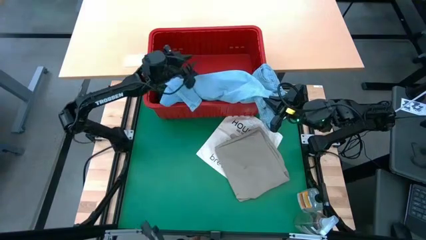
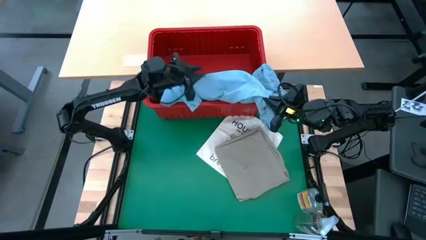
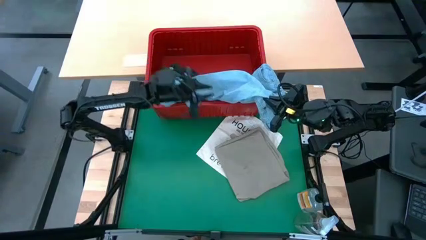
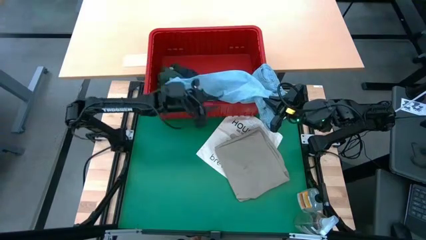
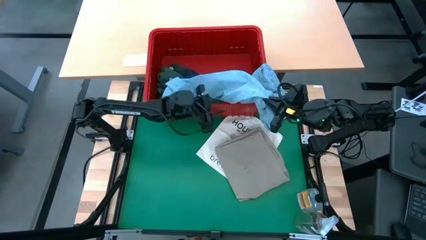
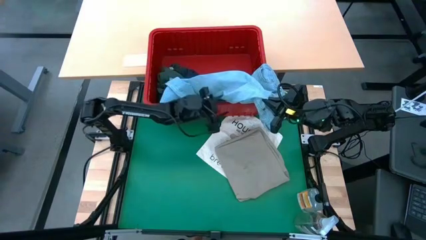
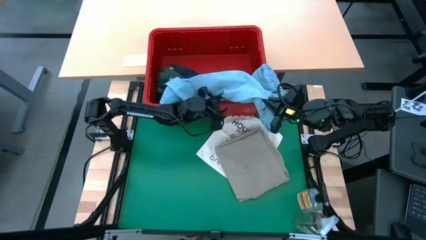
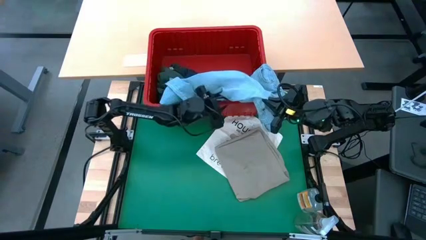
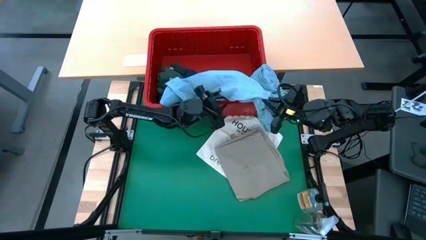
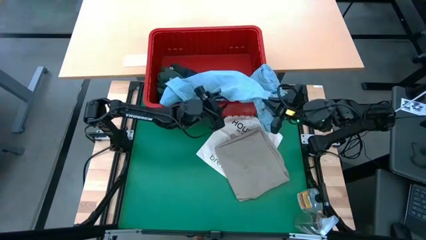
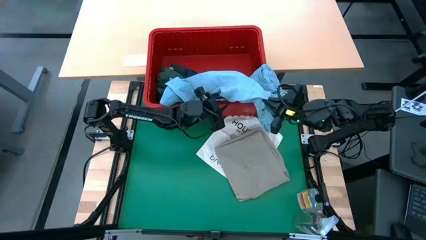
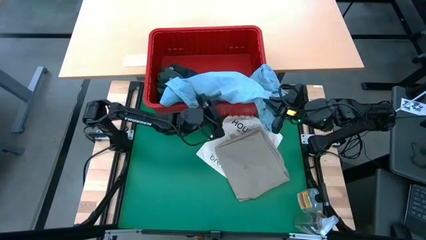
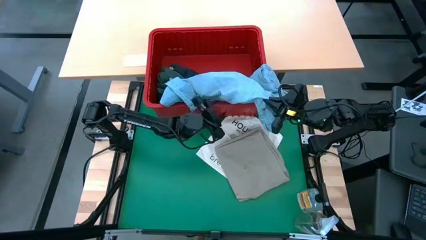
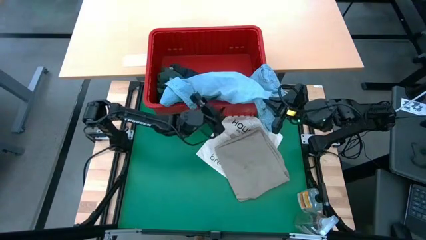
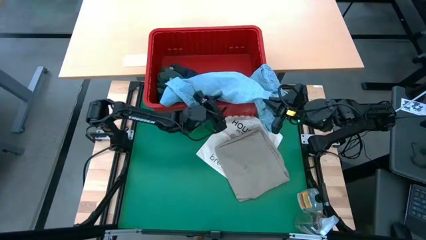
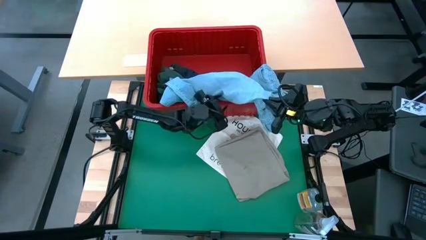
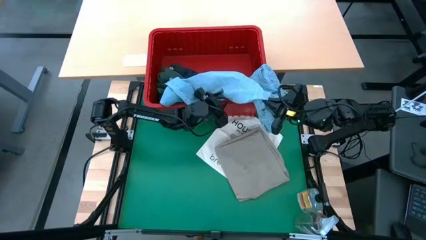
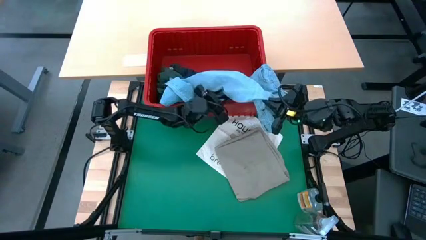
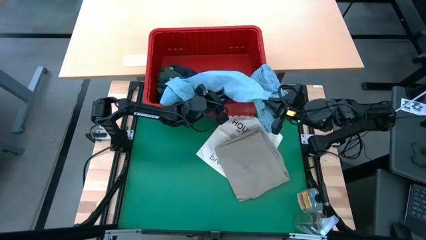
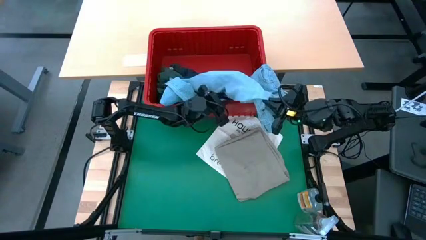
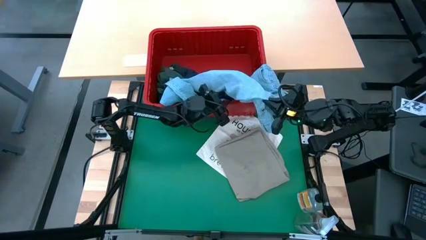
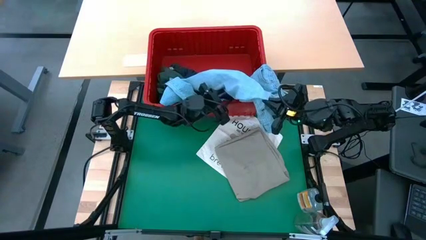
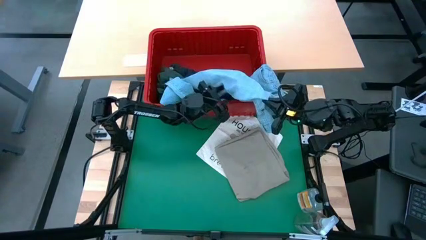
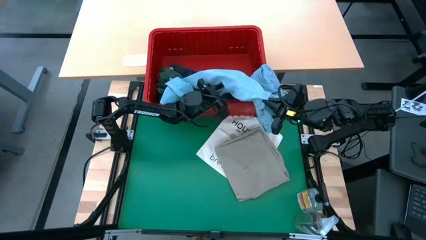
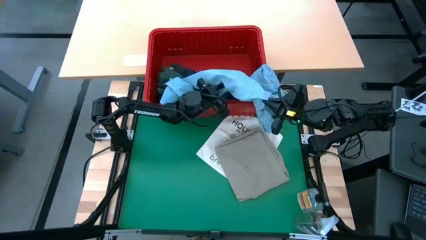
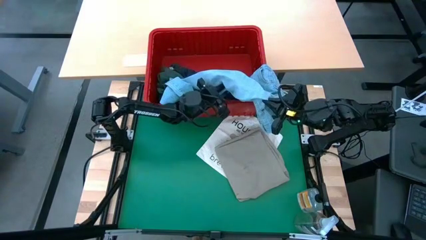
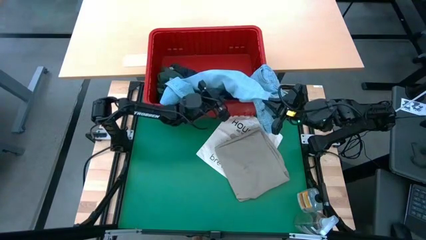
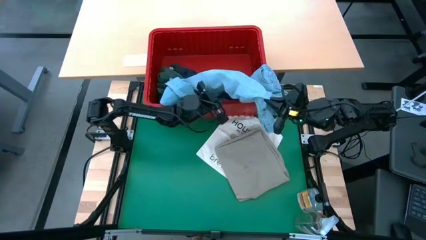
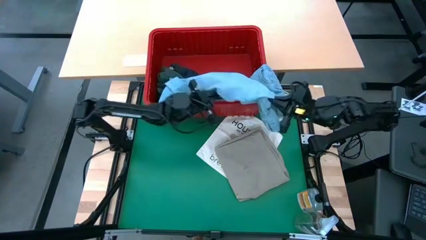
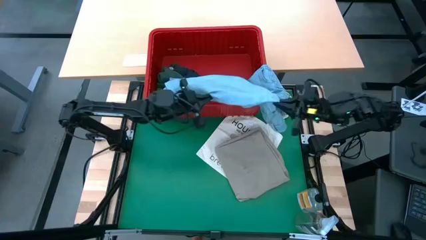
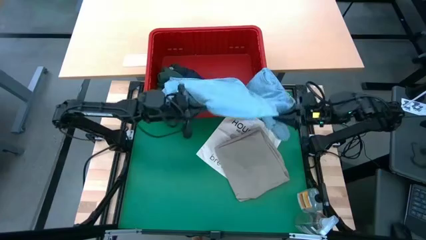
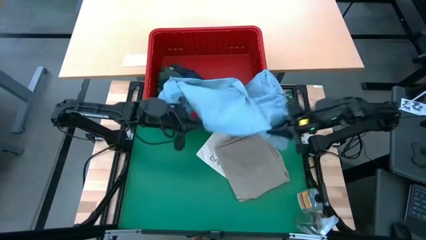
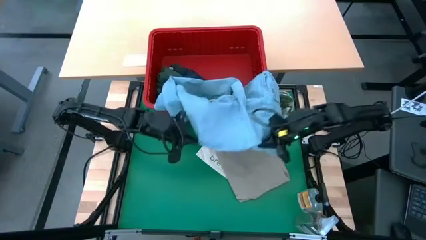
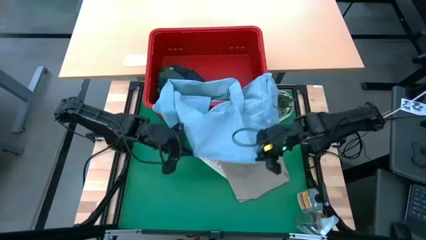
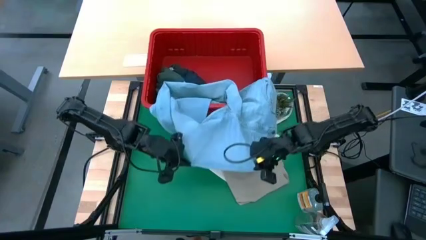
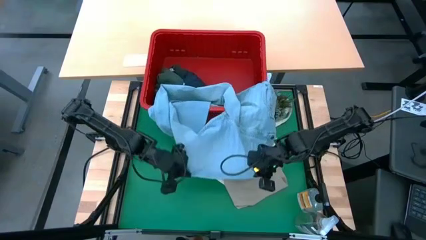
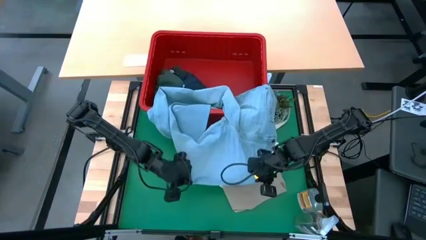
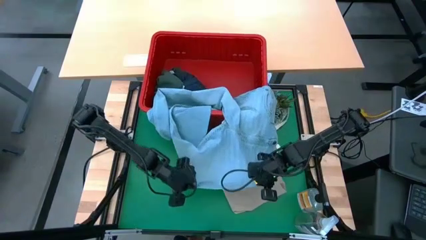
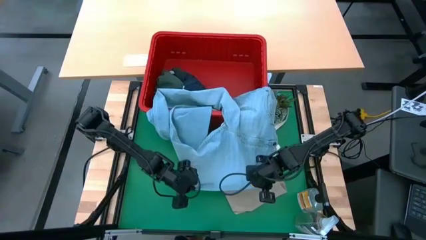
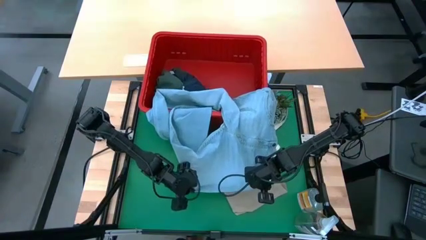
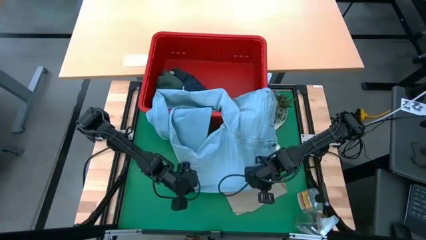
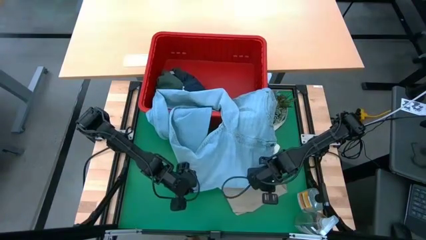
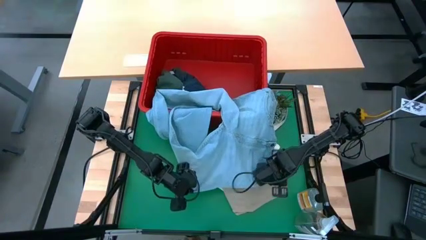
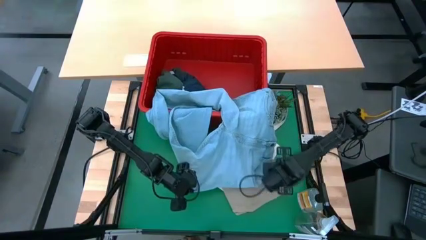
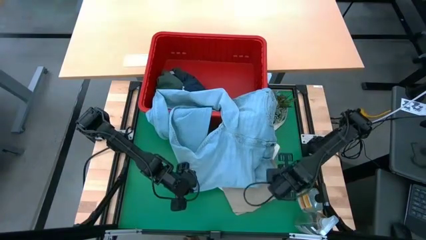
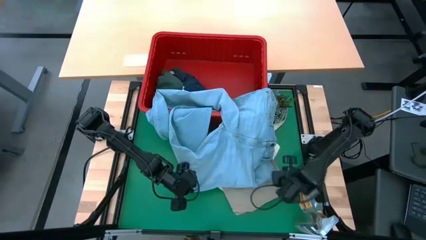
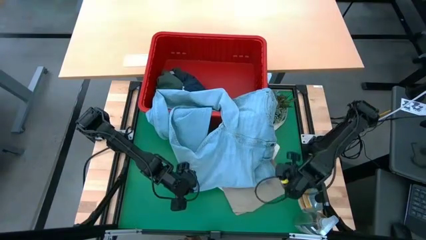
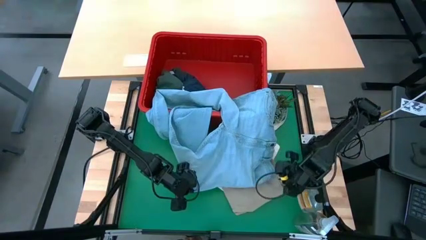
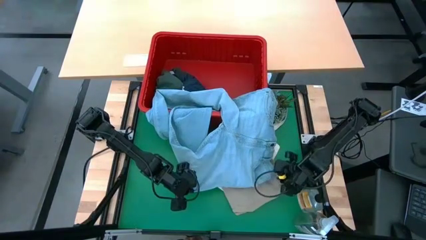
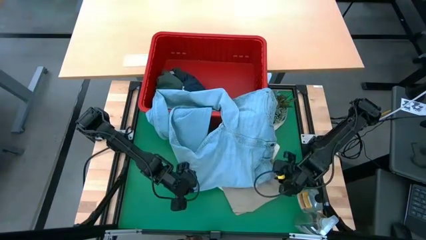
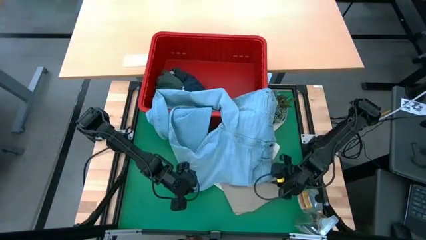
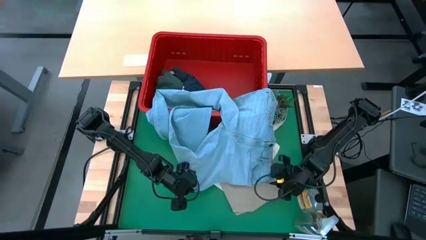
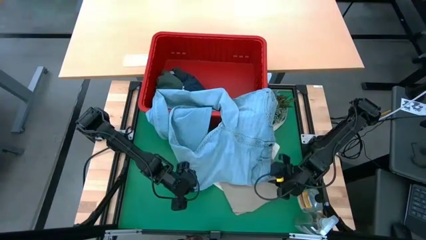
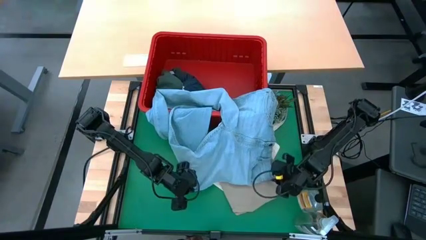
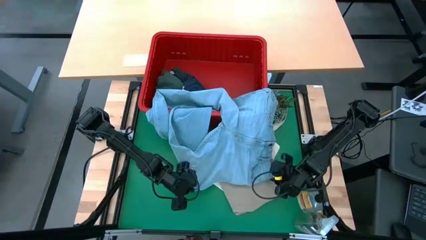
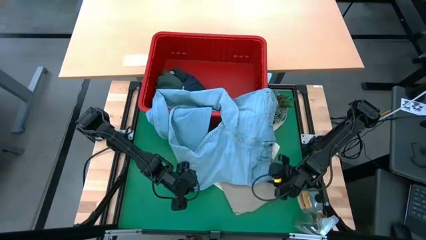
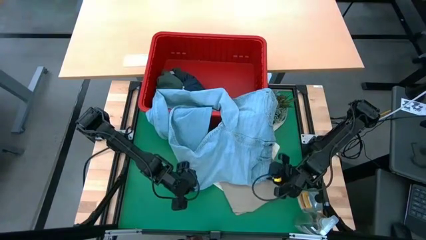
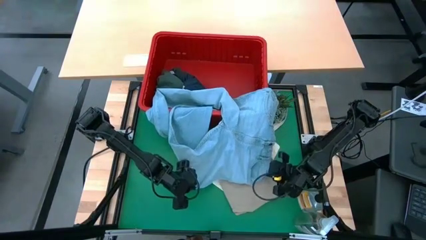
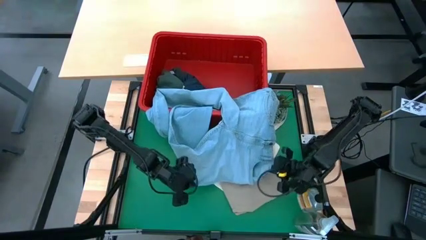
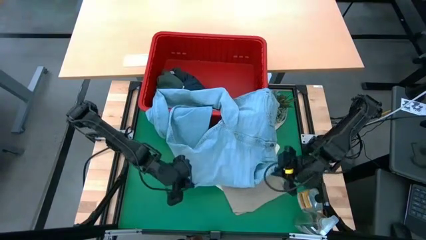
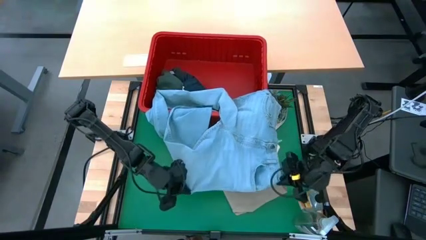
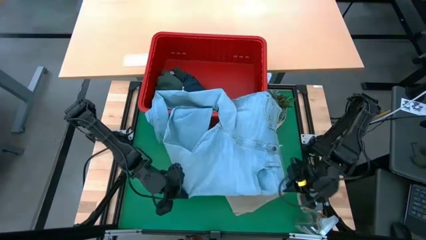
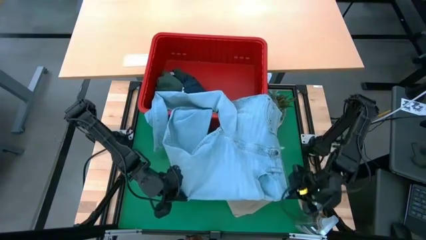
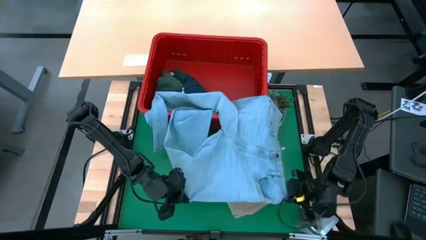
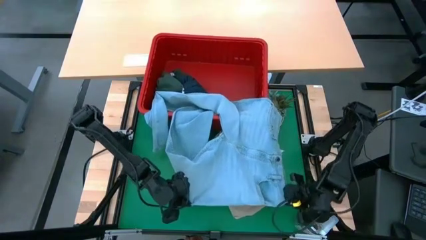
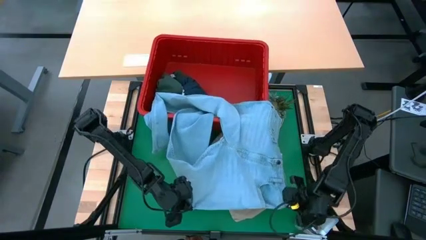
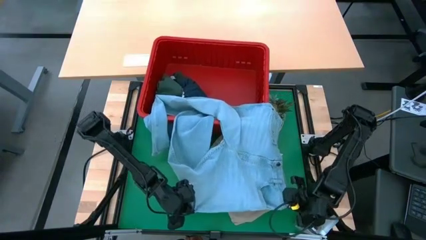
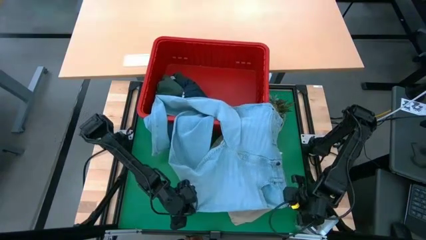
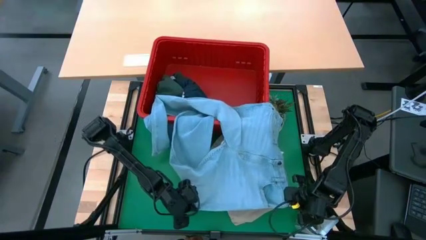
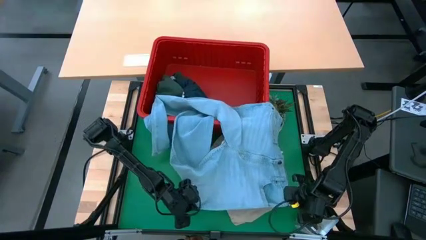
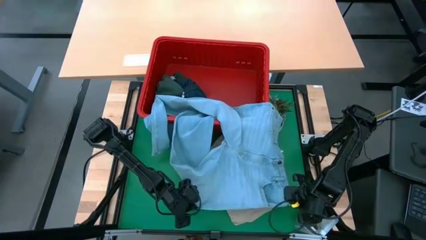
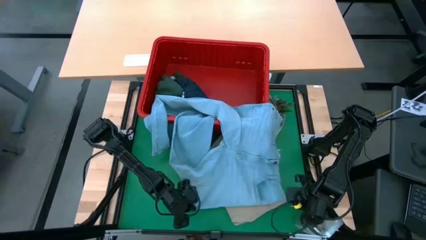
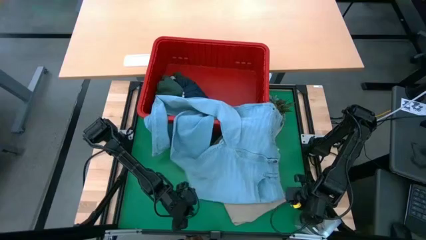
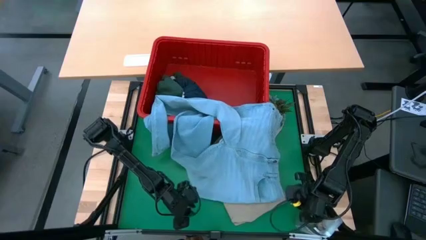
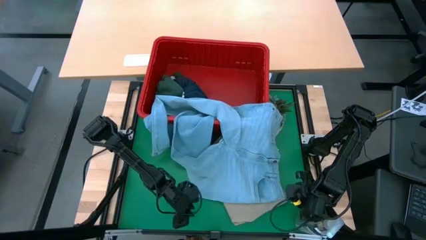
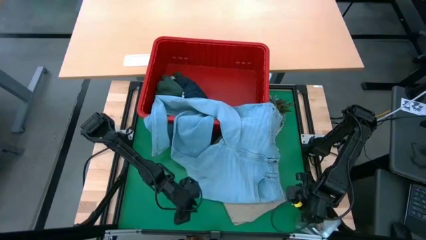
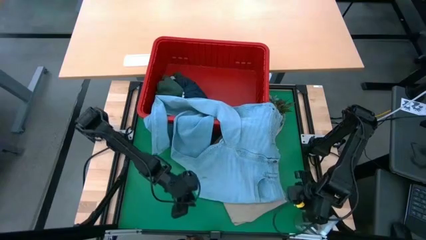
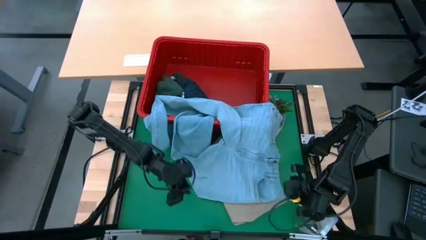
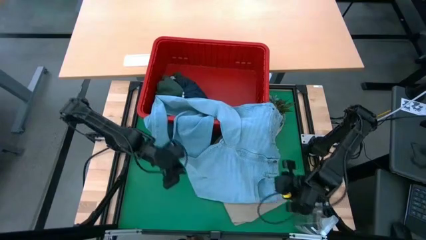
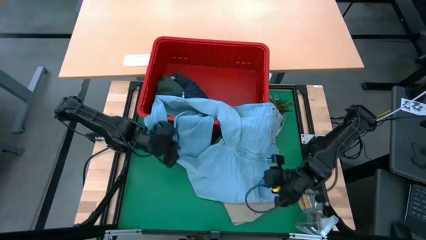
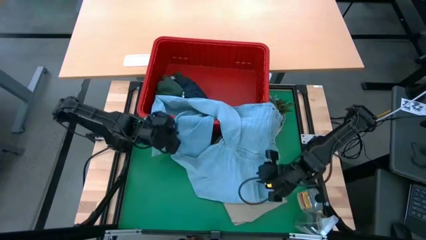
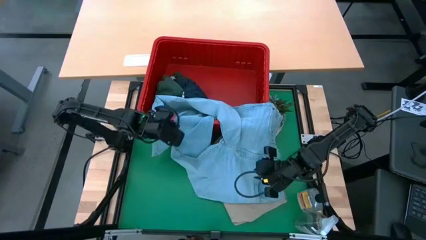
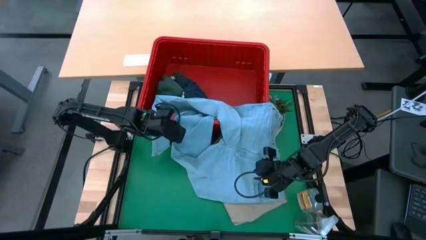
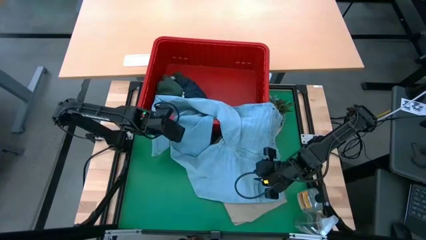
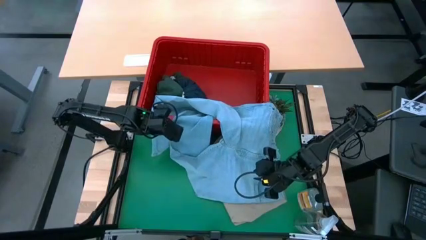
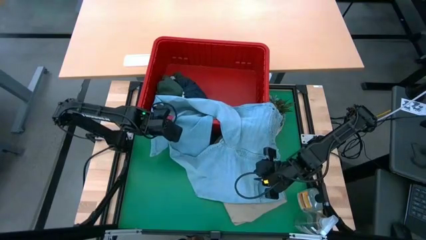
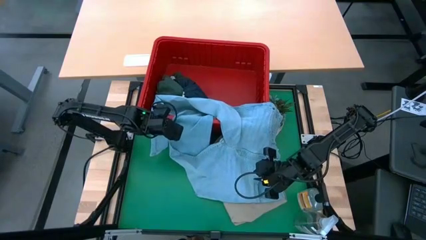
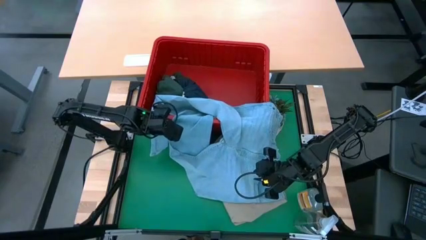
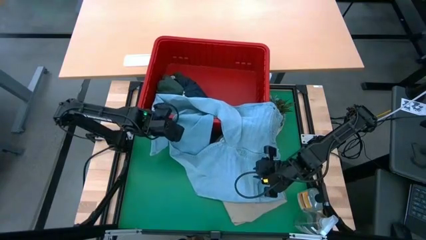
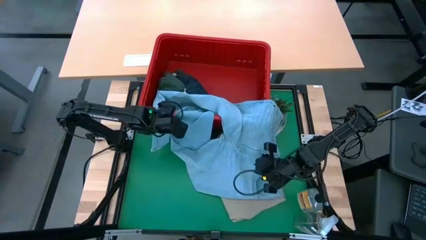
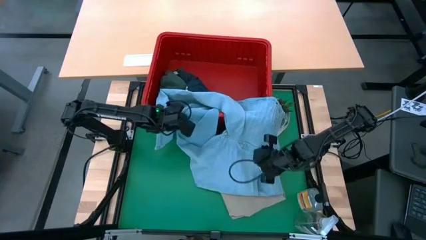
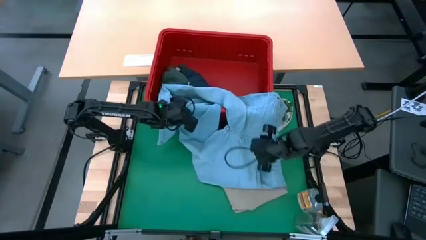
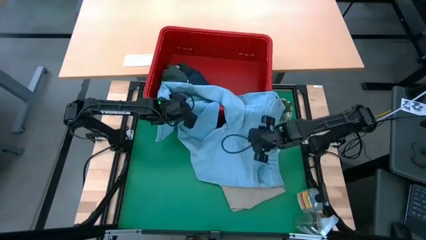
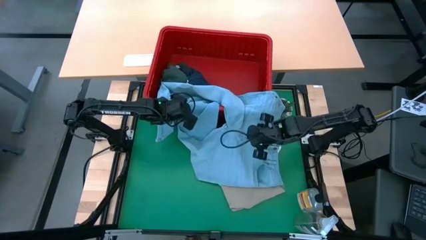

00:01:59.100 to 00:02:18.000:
Task: Fold Laundry from Bin
Fold the light blue jeans
